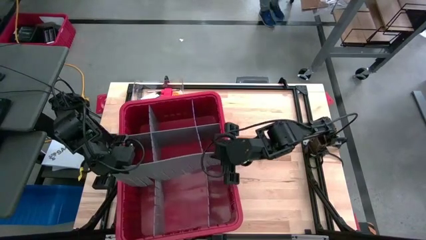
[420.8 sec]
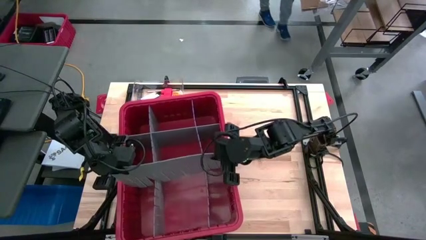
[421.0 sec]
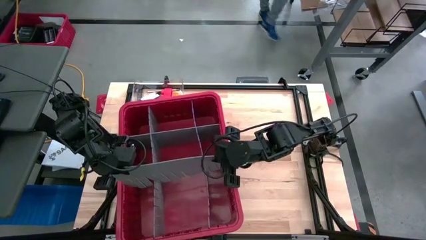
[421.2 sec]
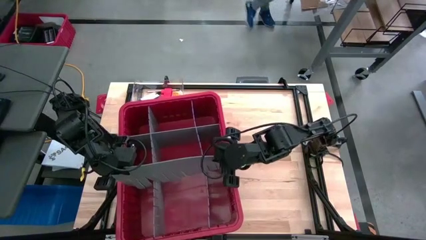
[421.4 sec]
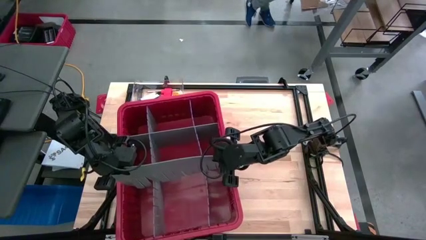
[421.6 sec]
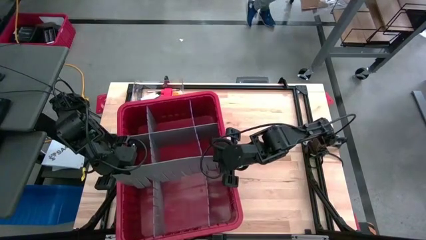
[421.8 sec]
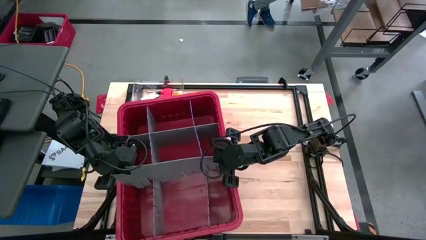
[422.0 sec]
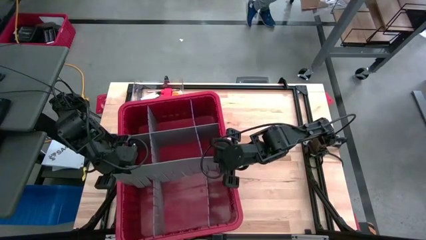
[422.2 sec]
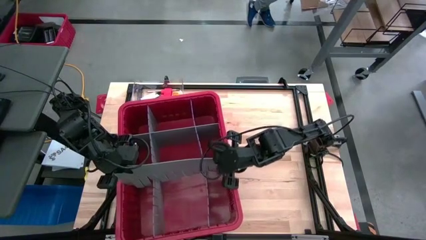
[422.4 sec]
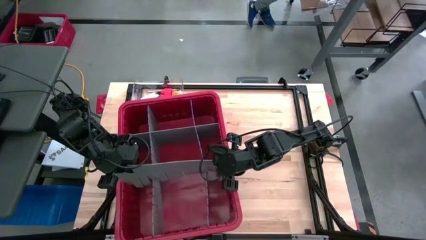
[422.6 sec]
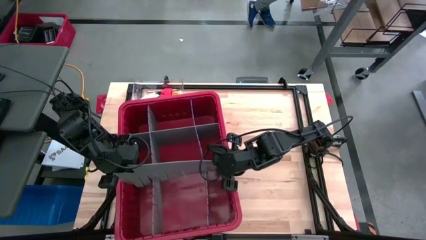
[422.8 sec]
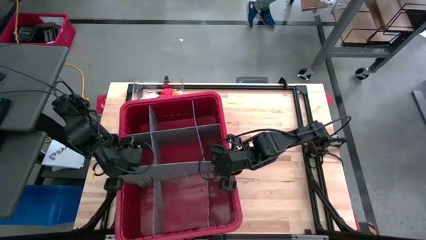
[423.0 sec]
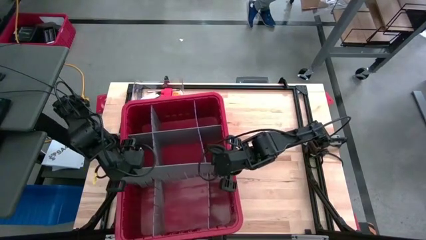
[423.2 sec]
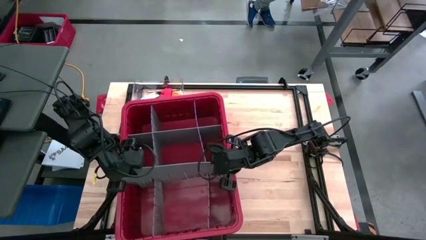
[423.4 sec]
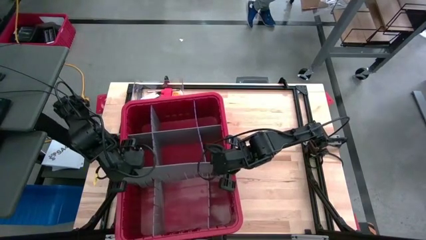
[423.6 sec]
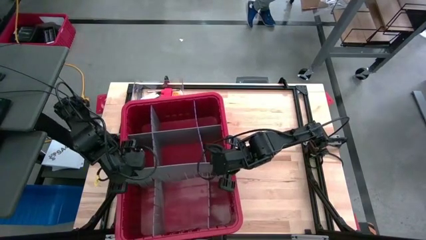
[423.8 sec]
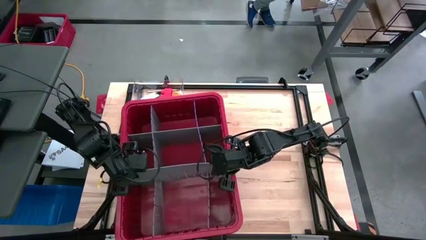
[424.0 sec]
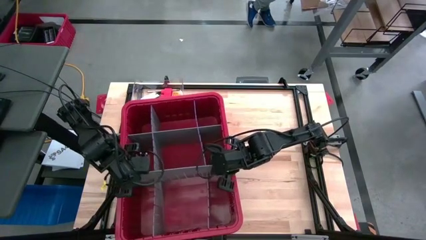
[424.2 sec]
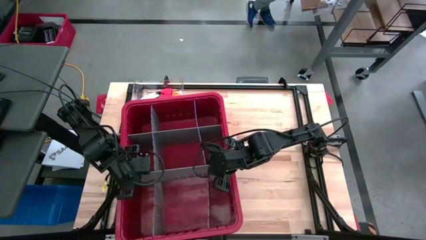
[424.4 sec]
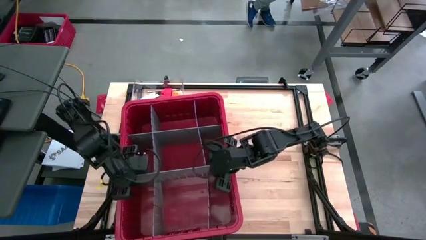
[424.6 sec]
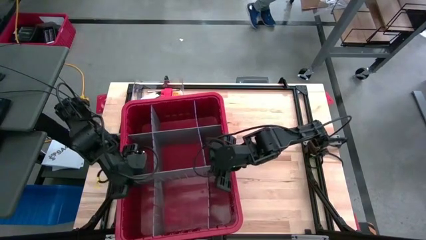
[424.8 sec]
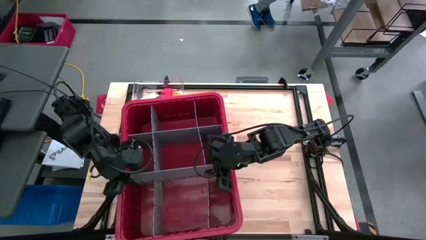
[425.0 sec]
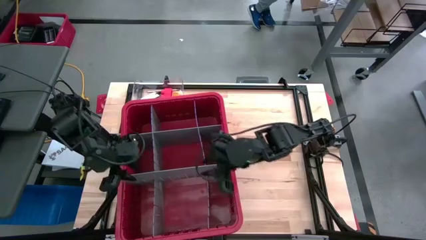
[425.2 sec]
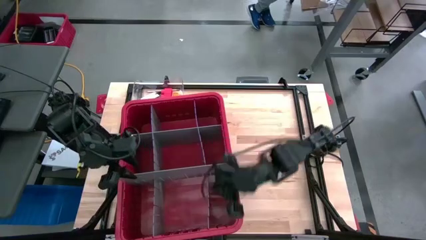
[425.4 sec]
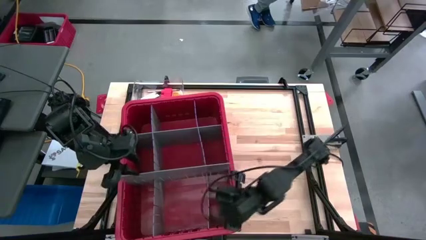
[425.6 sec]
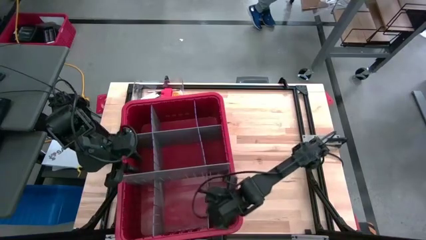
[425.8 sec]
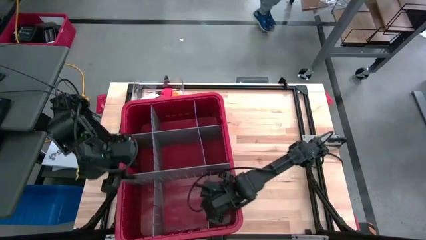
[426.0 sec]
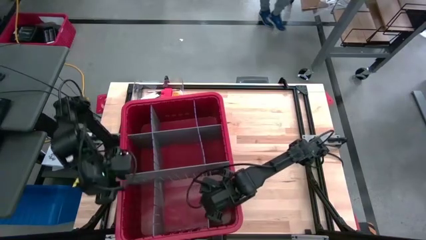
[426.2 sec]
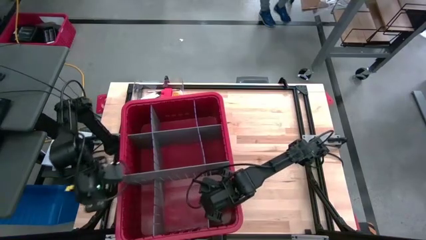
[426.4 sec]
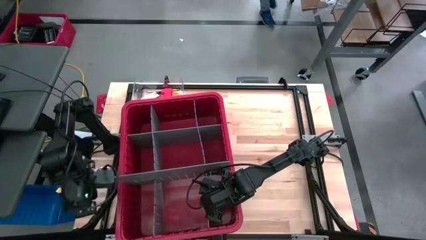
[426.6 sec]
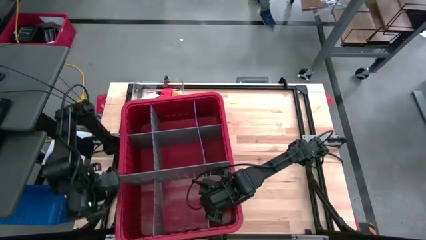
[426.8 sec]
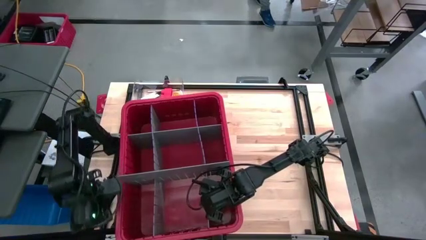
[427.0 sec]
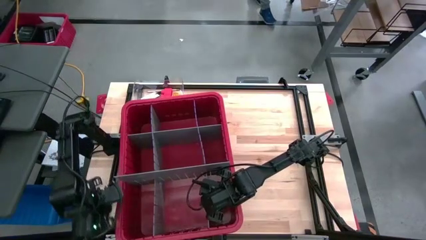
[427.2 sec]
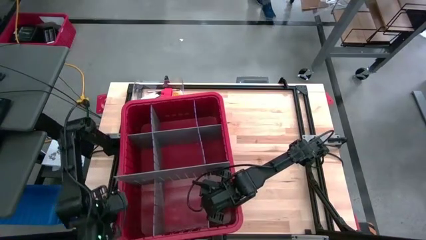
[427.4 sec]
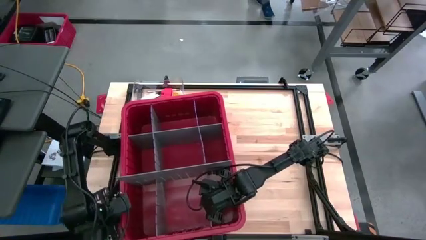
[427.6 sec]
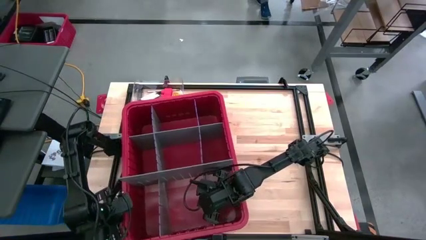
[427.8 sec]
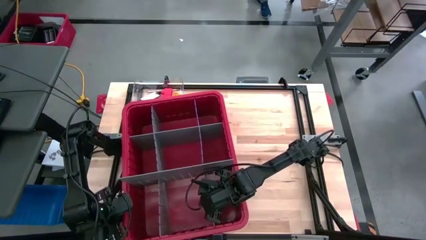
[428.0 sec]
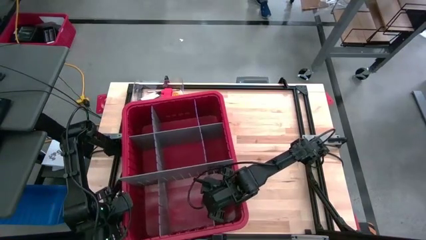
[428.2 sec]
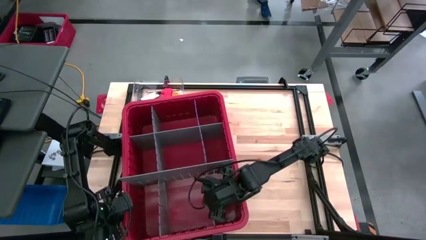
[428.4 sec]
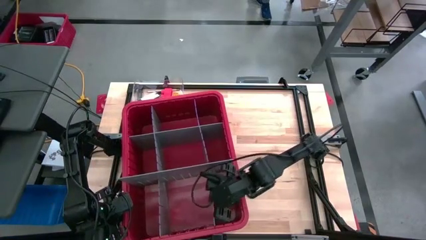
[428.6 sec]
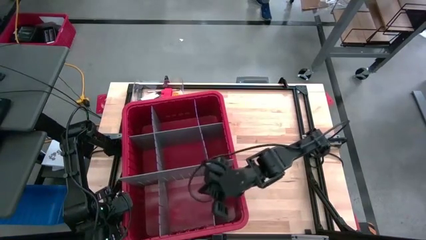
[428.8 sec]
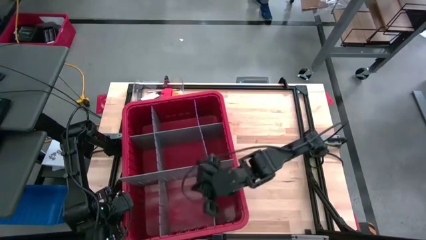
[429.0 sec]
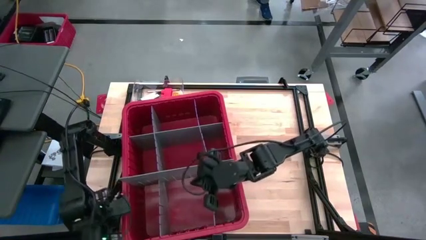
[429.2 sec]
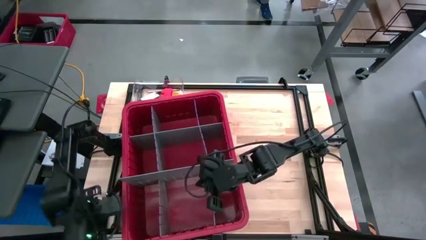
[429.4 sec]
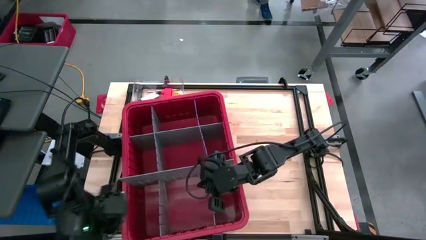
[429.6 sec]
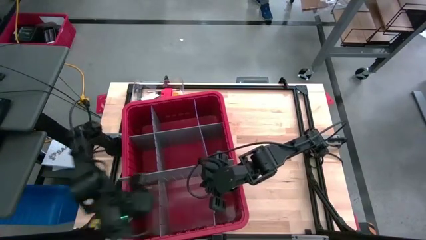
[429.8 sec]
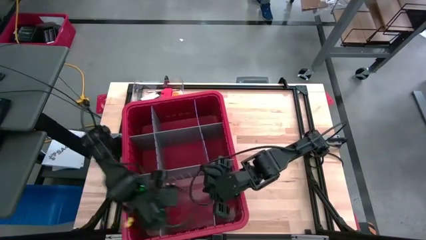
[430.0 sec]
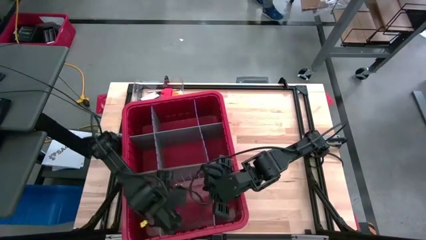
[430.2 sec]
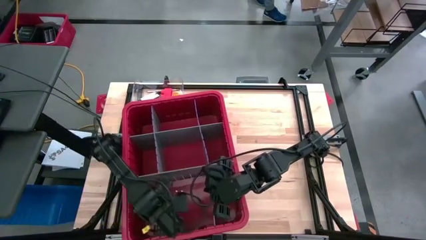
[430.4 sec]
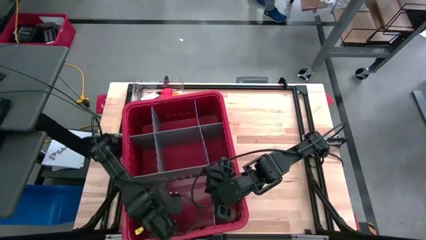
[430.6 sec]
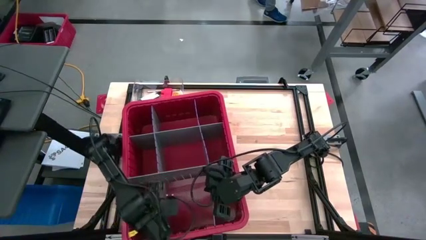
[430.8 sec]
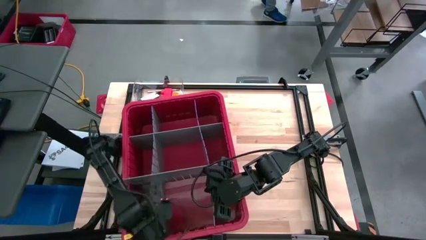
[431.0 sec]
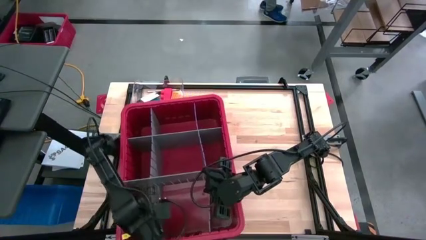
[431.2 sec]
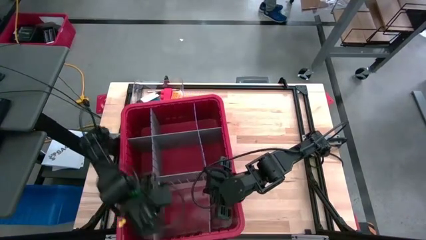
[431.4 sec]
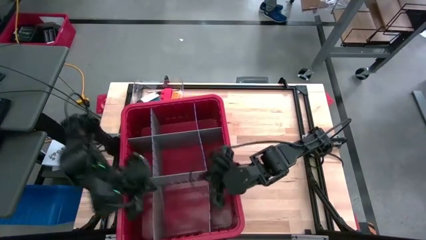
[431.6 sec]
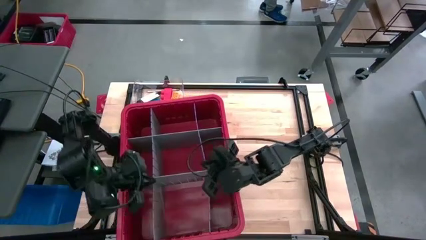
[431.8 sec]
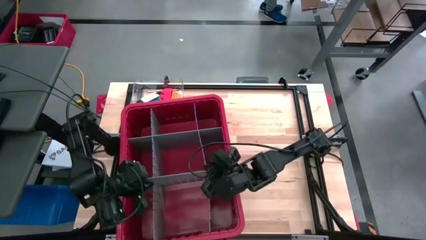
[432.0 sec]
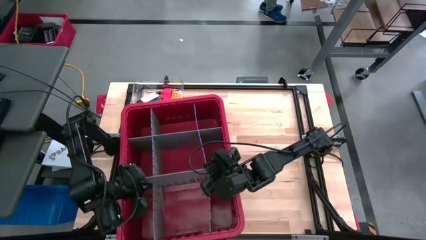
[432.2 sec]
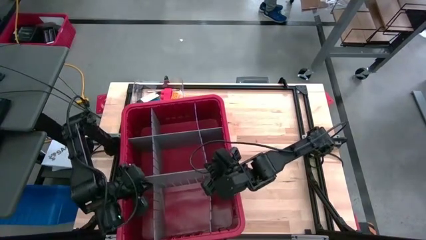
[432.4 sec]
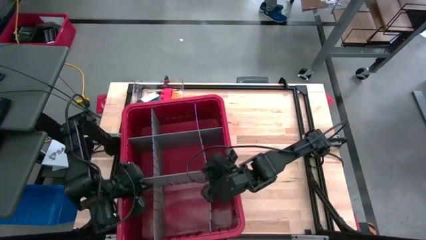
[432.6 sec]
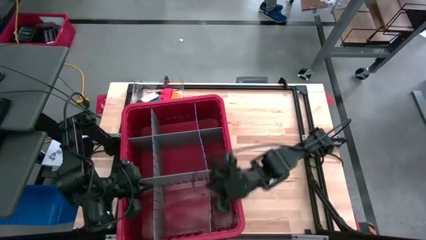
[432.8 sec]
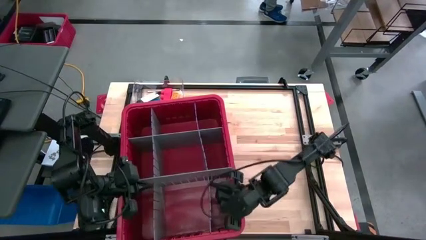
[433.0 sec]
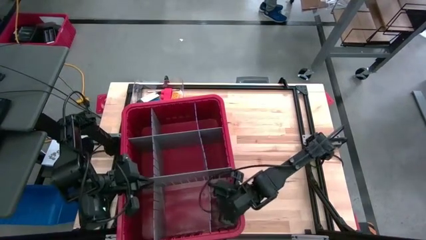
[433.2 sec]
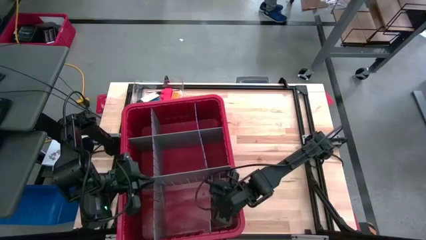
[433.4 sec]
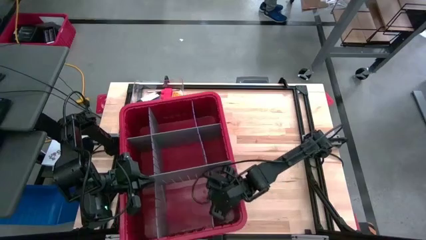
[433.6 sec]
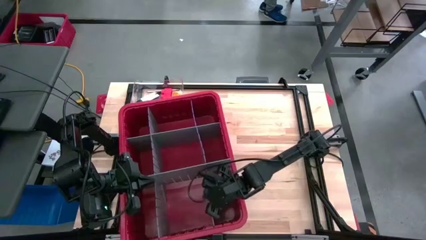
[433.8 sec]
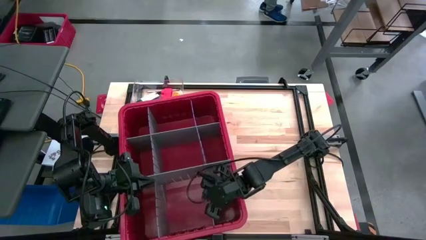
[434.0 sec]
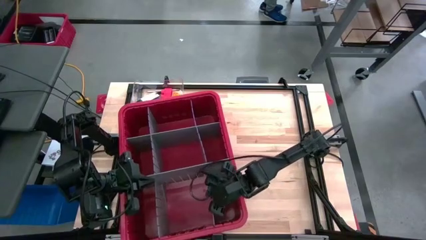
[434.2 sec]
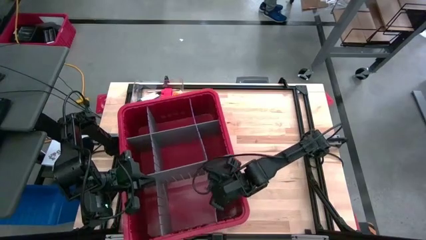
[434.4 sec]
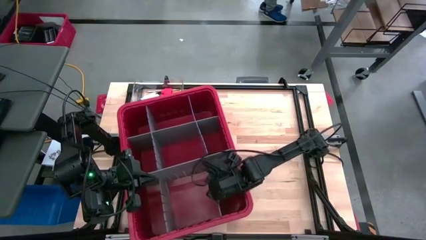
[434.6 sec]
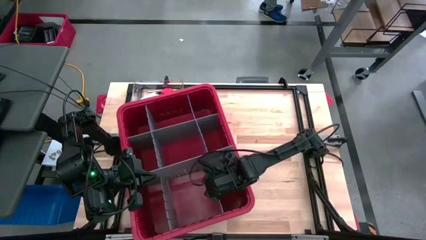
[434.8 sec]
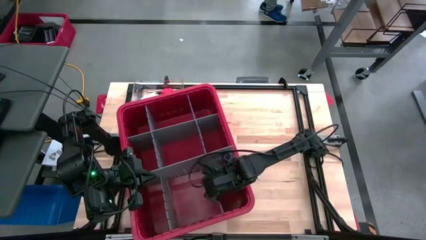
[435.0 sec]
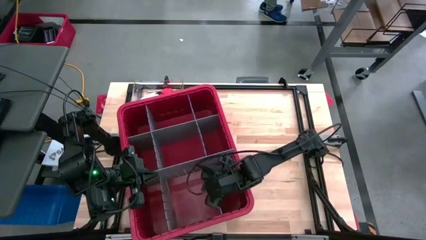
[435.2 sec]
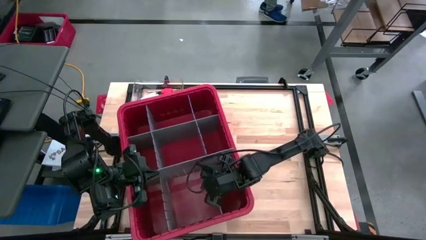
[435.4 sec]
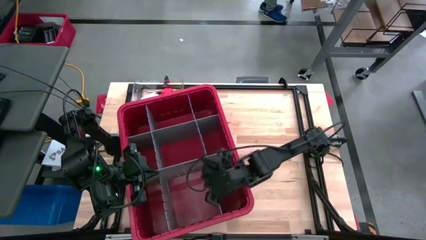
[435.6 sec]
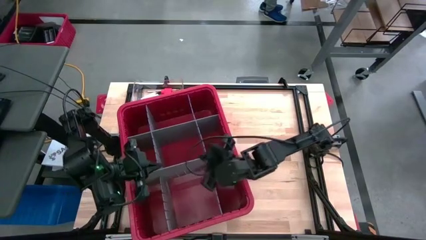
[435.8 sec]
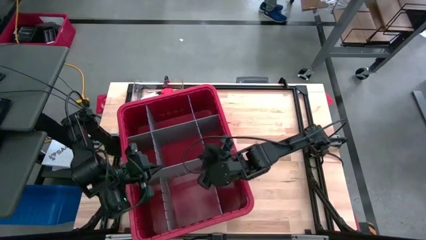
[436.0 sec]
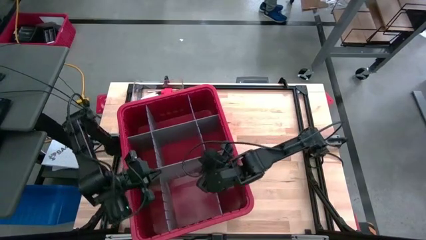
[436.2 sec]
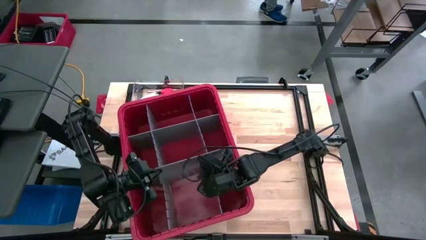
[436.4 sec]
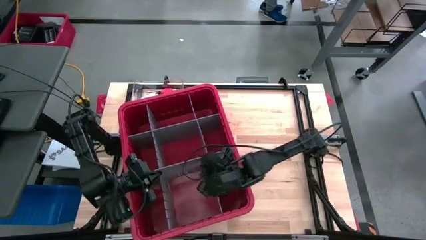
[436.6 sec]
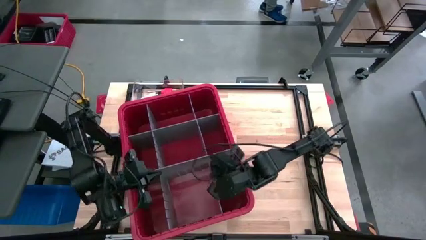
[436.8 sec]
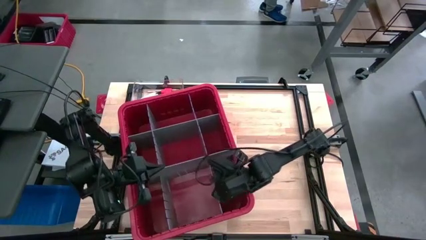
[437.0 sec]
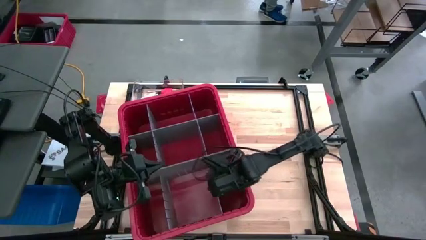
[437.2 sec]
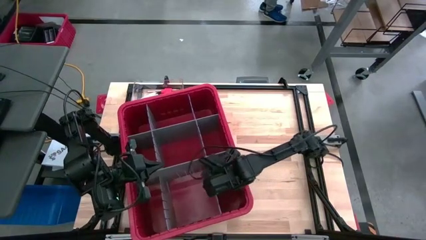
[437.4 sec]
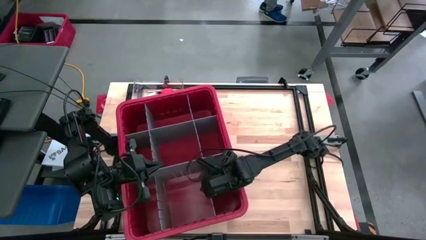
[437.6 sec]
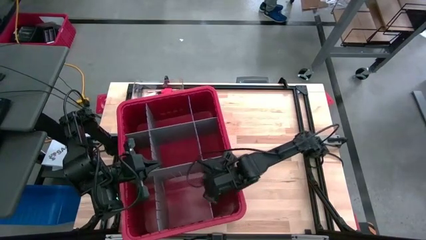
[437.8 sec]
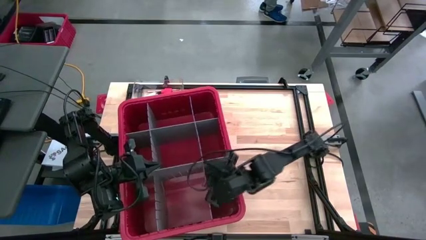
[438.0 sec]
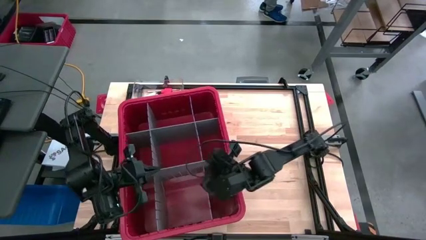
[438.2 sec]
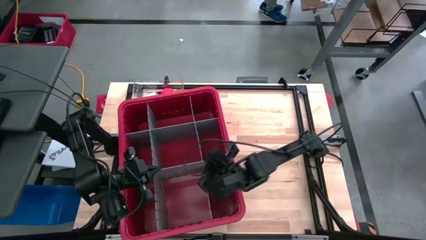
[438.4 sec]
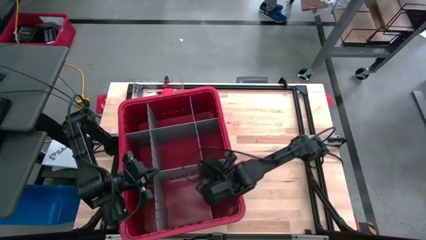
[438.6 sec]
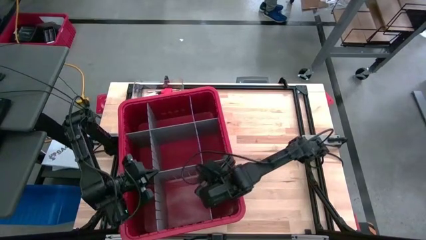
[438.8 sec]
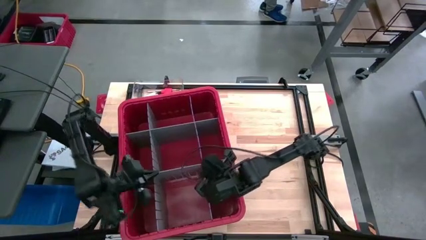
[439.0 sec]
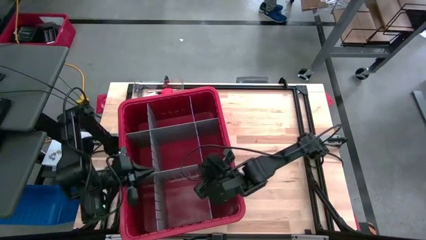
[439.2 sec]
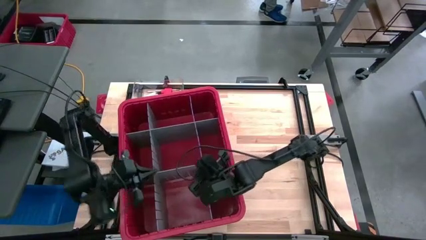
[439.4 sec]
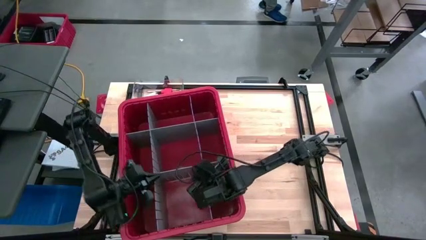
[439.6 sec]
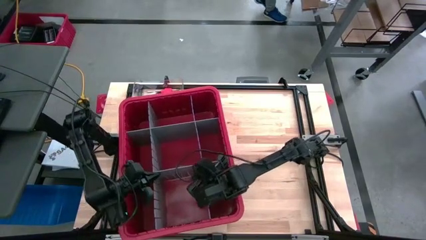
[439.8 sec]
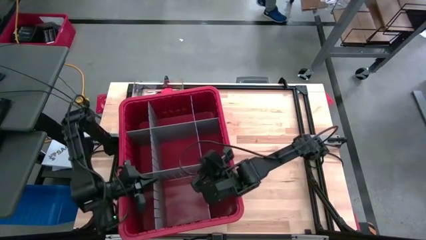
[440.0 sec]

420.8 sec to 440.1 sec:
Task: Sort blocks
Assemble the bin divider into the red bin
